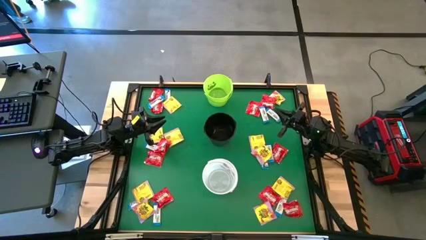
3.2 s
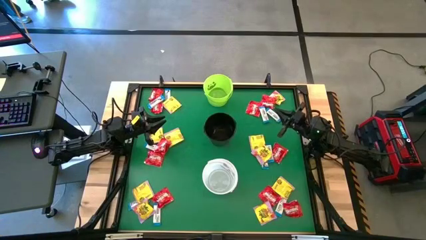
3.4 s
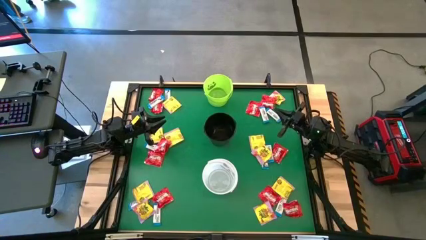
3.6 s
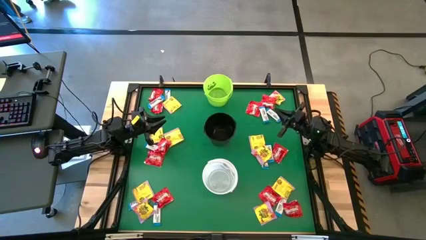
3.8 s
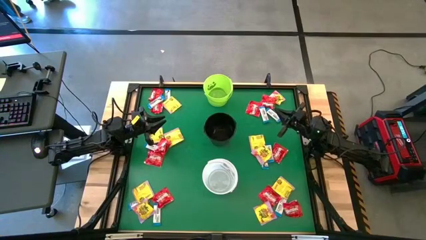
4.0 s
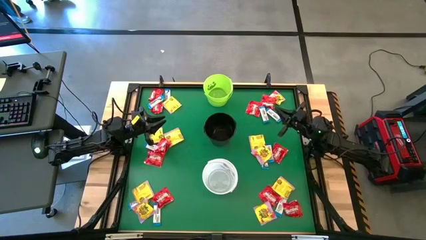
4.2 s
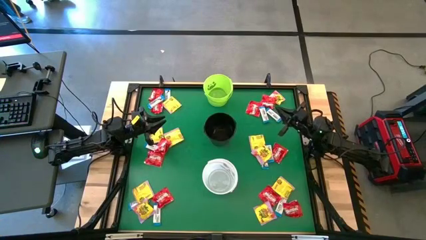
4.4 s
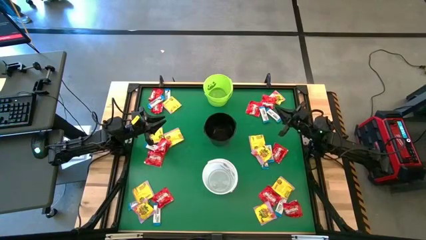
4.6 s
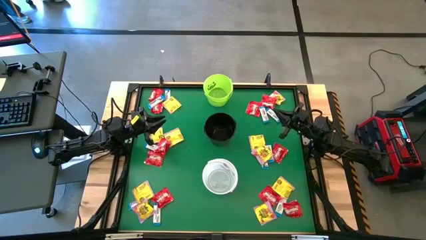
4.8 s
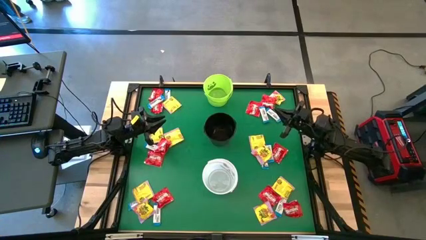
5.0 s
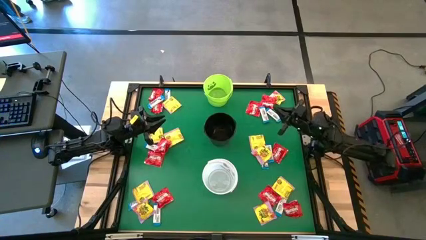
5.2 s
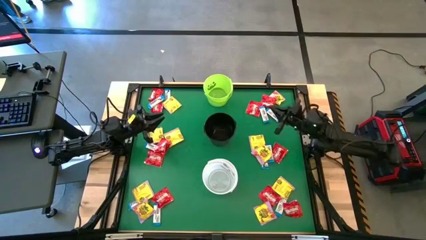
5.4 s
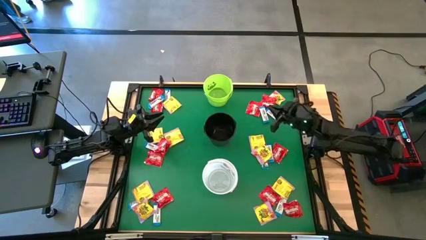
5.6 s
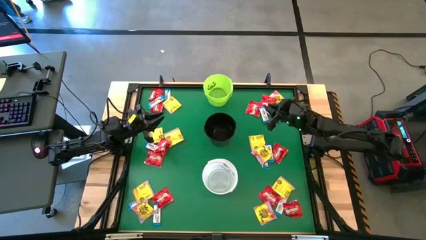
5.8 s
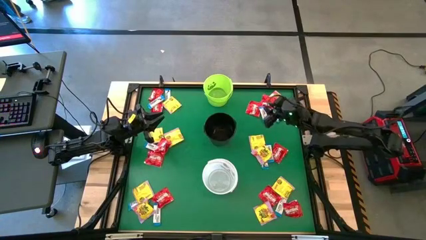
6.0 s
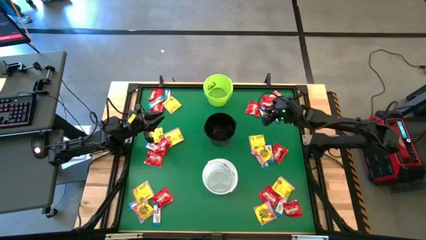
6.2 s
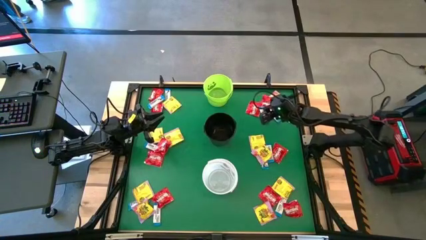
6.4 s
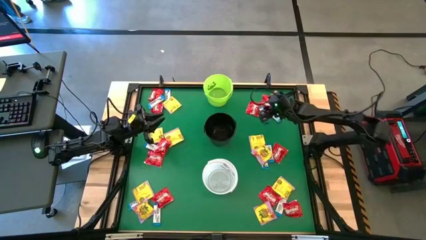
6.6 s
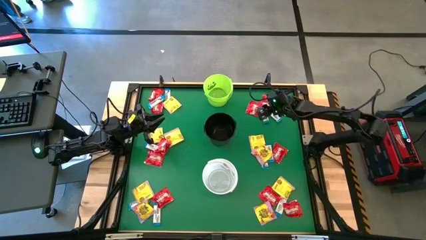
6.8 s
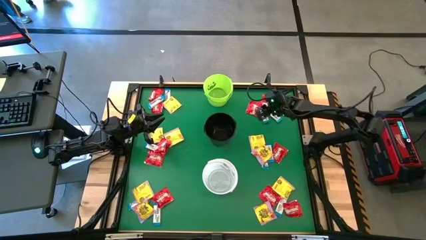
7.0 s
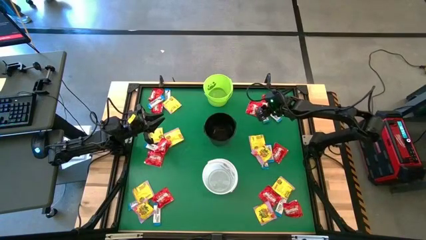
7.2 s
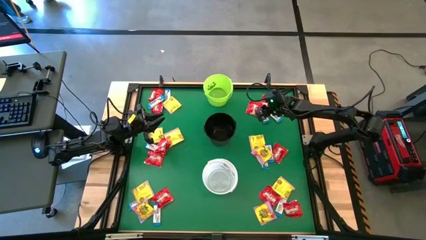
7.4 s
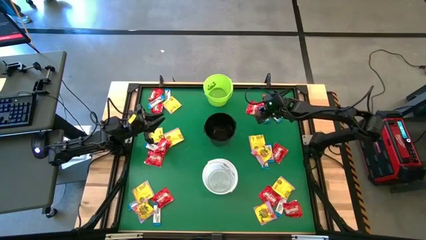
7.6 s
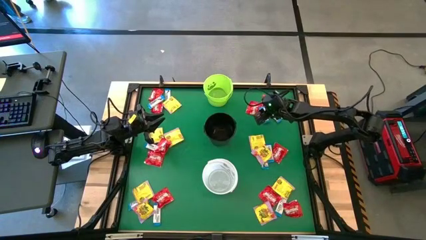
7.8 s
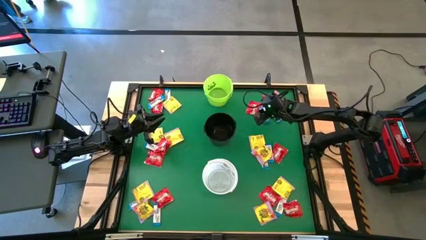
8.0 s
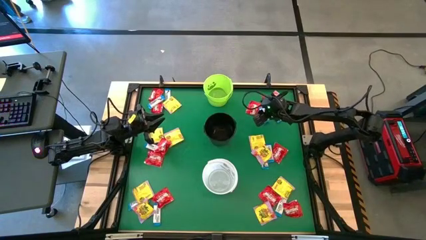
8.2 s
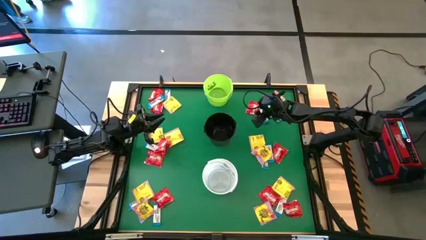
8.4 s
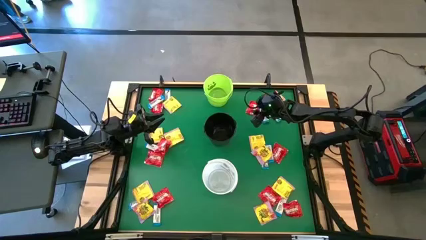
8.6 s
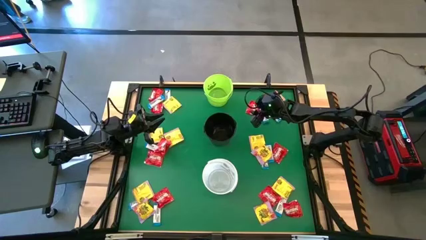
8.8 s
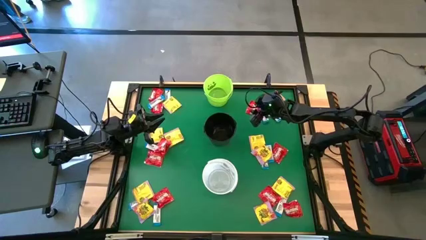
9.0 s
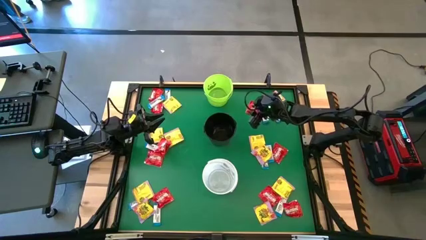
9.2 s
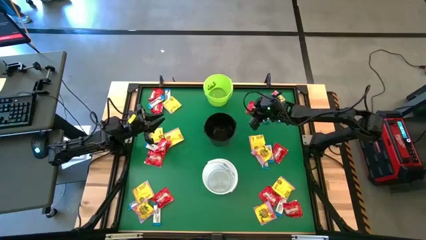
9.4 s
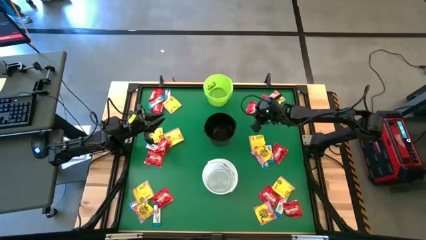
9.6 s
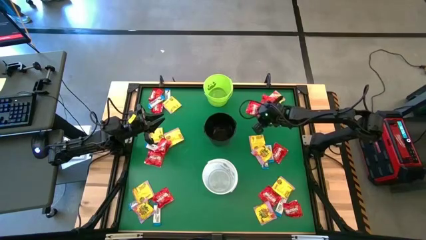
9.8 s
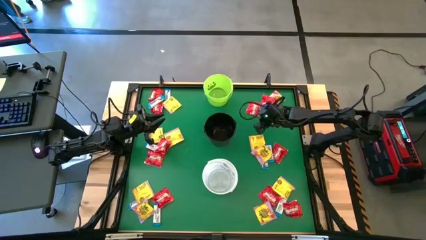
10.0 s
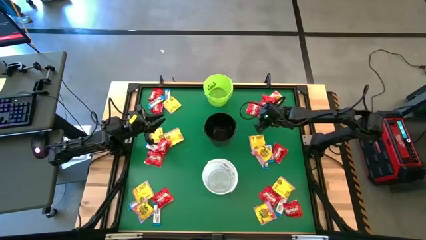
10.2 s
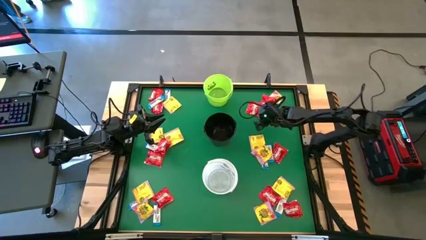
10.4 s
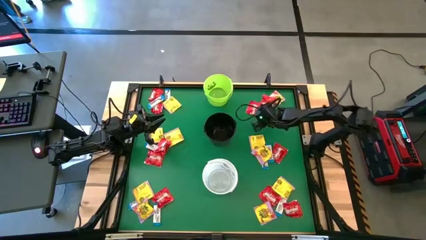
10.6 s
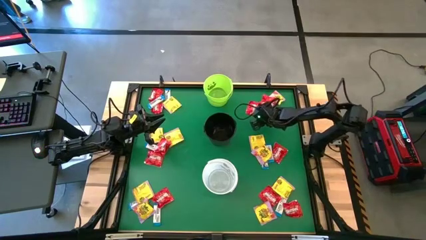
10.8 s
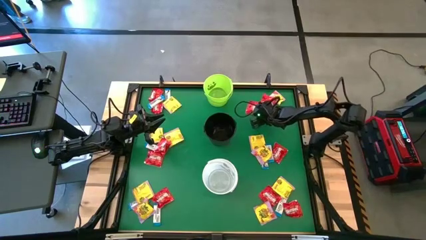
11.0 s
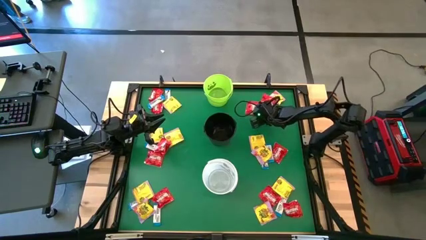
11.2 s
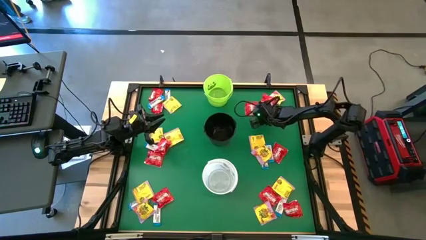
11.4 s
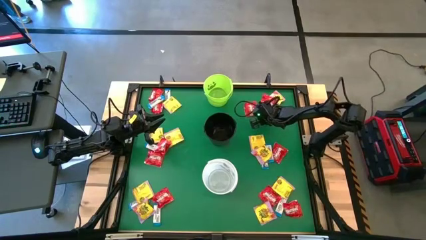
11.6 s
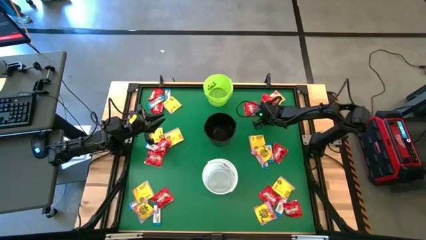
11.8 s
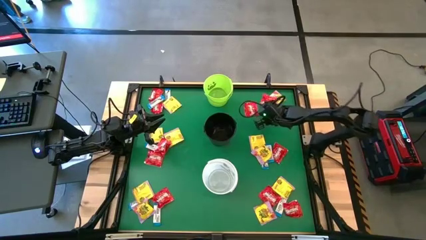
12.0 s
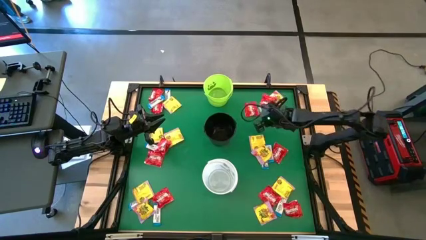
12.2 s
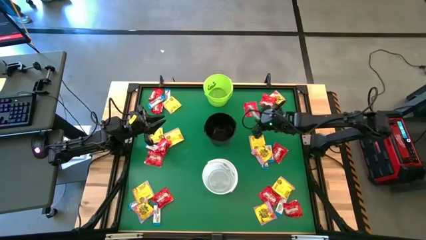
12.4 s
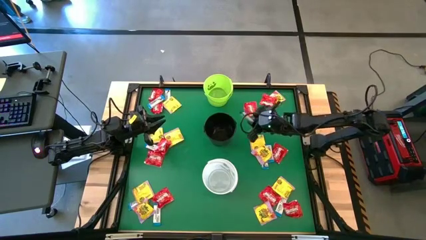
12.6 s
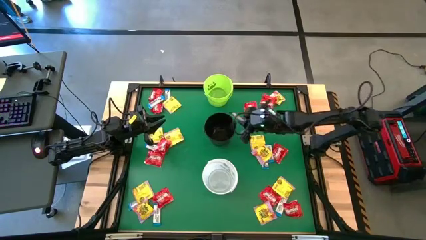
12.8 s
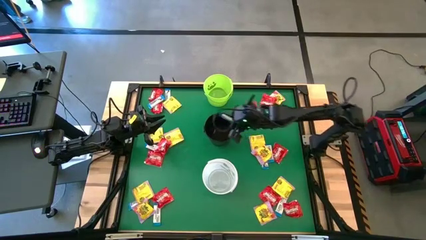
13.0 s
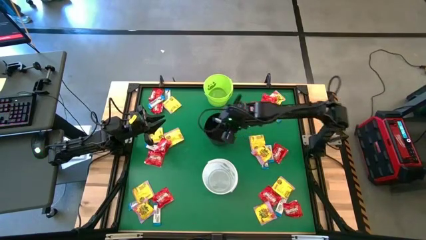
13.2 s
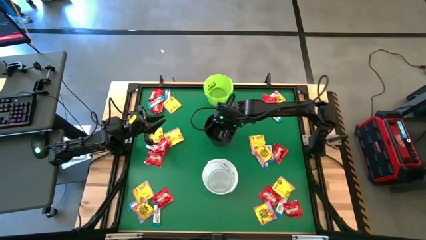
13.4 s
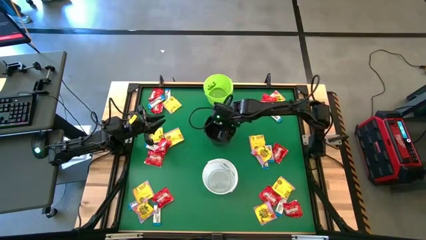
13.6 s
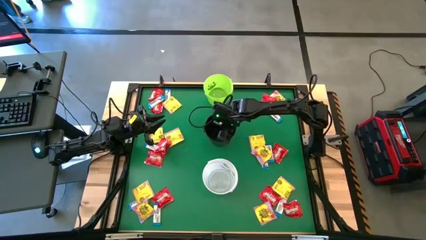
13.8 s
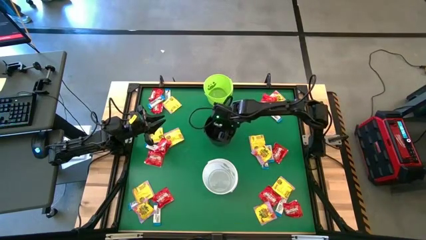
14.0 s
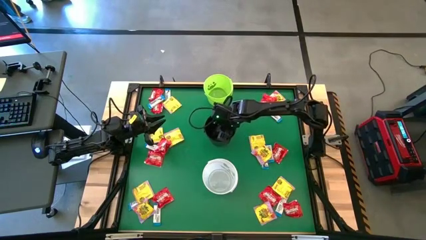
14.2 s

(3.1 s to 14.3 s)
Task: Sort candy by brand, put in halloween buckets
Put the white chocolate into the black bucket

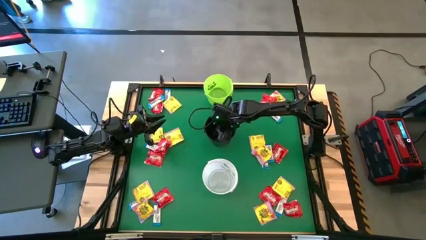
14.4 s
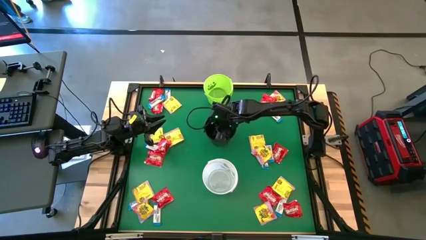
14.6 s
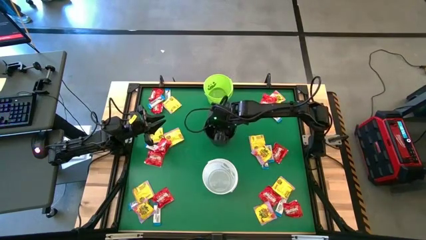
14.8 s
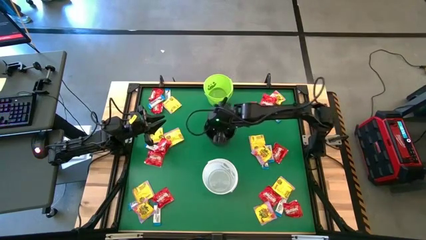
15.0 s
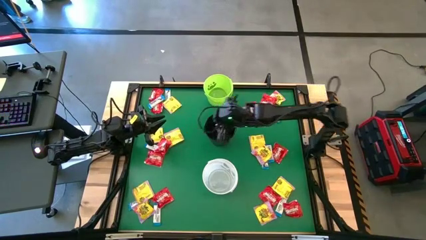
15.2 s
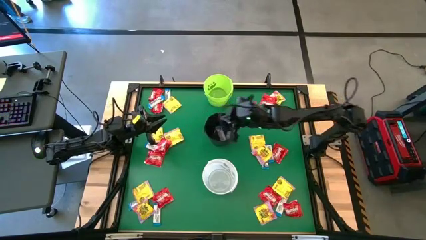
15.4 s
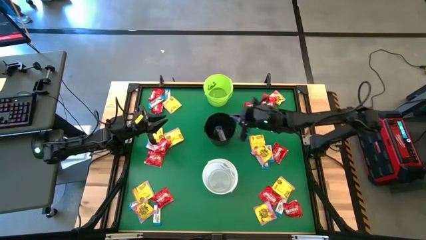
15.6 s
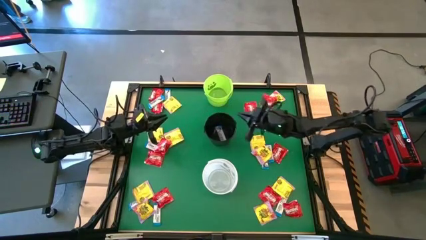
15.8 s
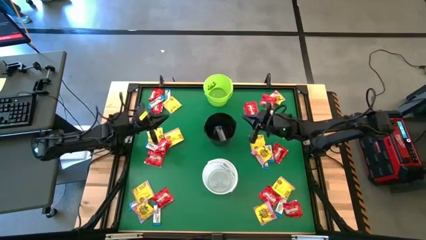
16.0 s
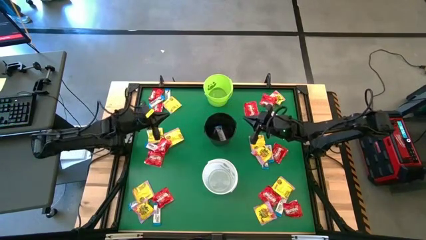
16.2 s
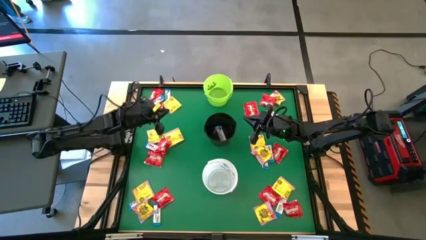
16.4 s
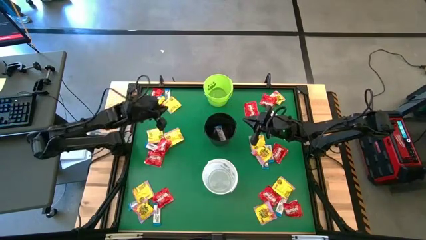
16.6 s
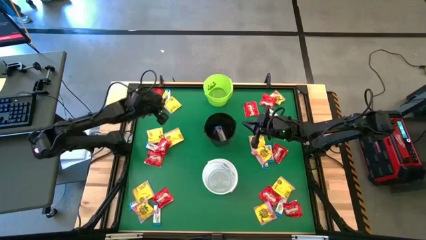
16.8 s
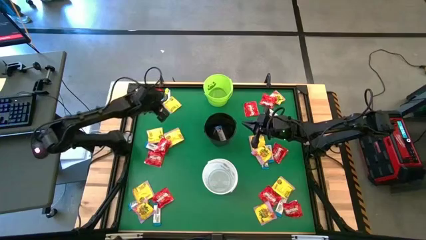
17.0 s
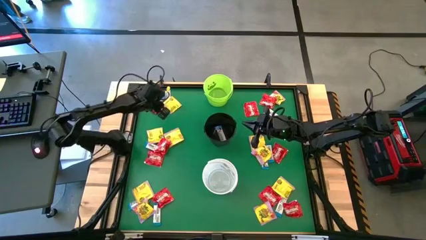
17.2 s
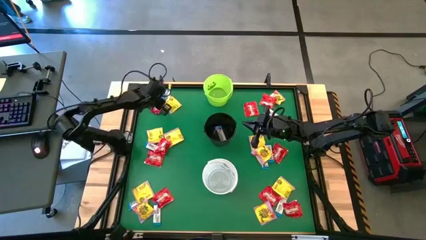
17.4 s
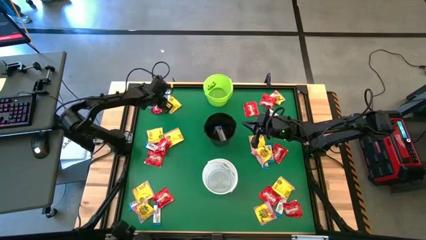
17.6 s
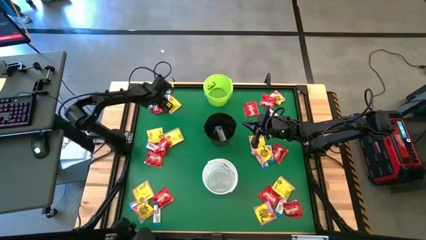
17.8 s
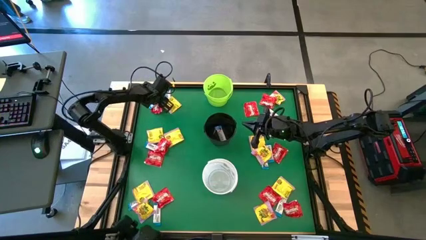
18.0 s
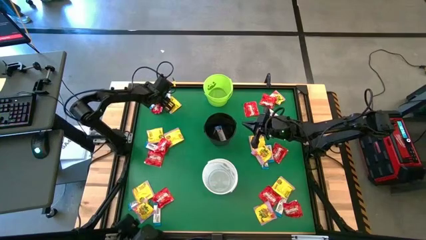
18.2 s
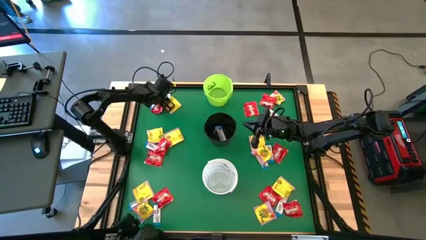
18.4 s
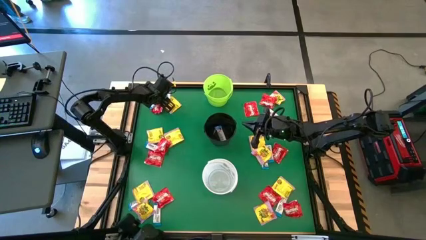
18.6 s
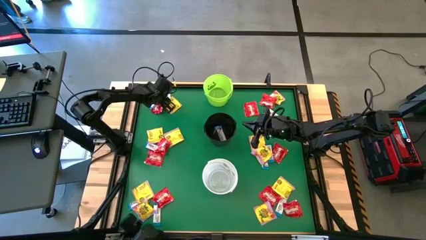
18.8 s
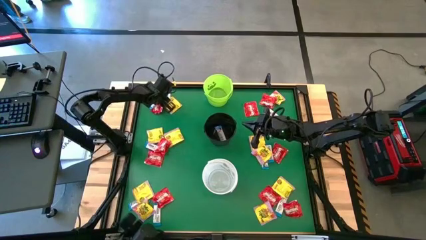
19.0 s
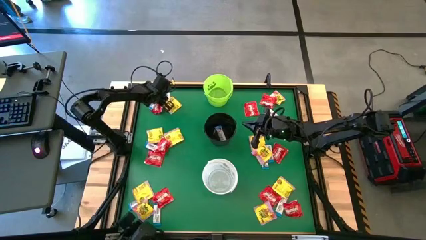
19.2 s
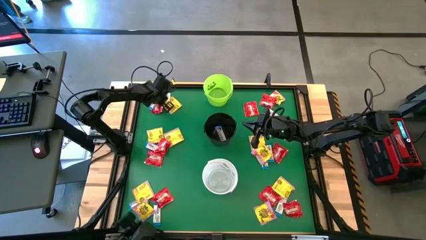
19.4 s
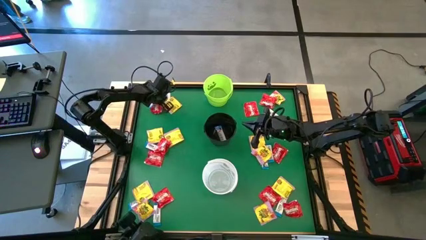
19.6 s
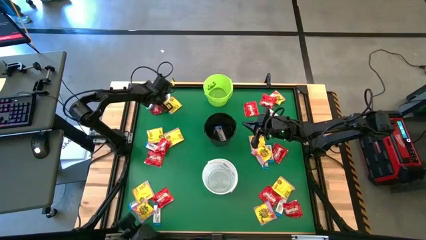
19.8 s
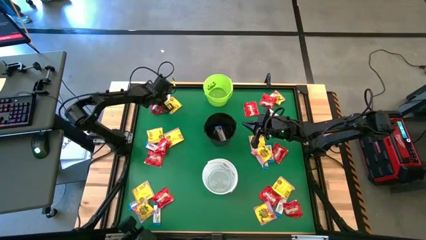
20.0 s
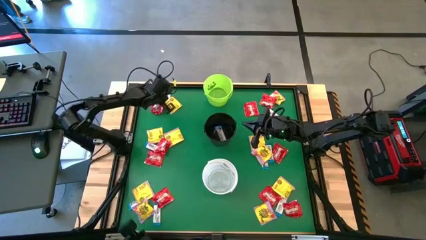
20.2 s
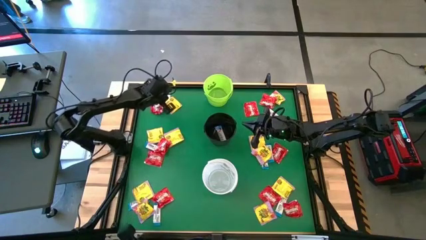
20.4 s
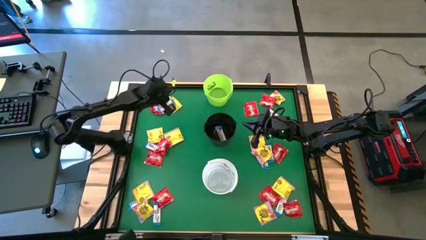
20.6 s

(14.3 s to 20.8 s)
Put the white chocolate into the black bucket
